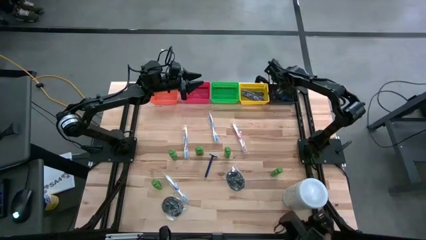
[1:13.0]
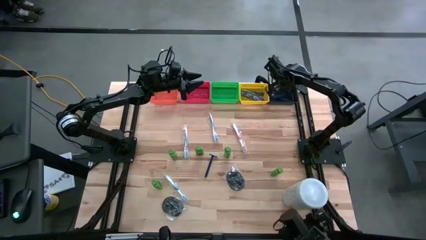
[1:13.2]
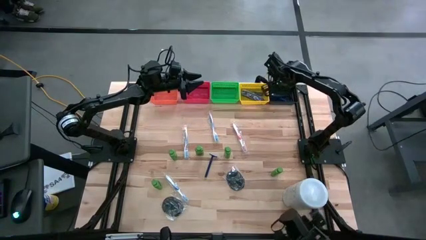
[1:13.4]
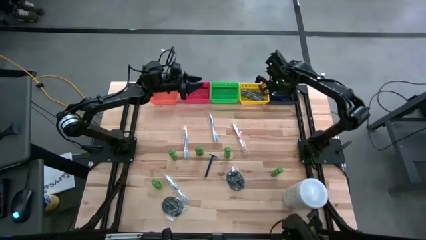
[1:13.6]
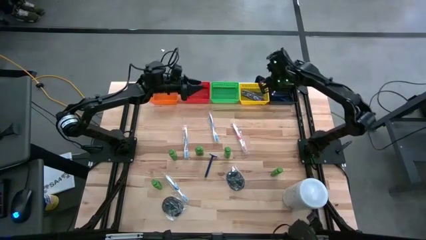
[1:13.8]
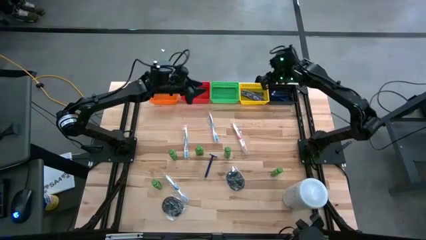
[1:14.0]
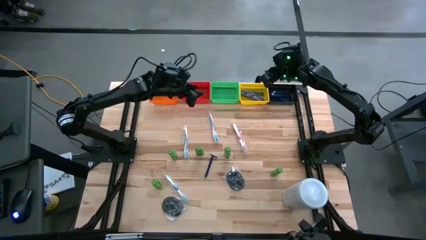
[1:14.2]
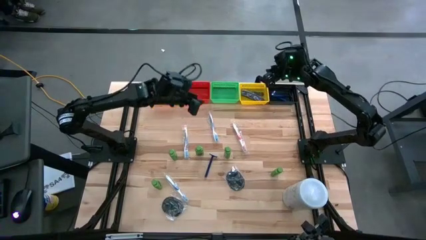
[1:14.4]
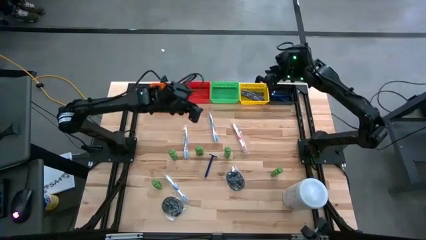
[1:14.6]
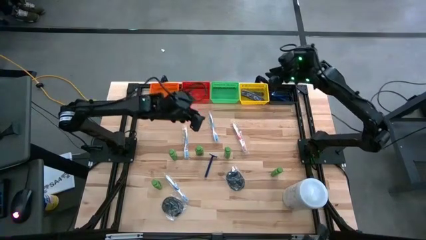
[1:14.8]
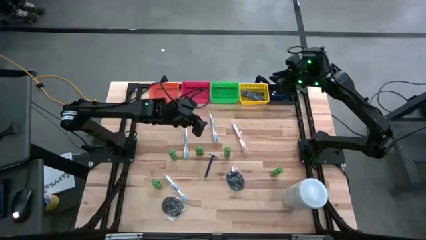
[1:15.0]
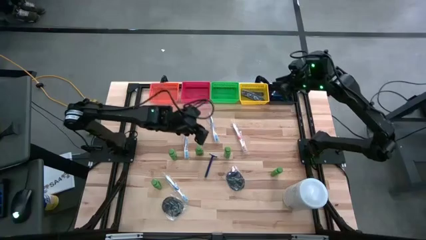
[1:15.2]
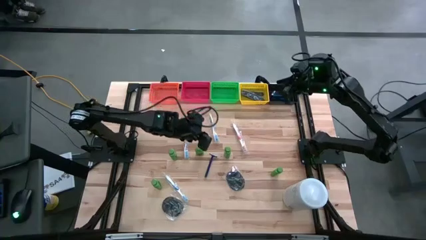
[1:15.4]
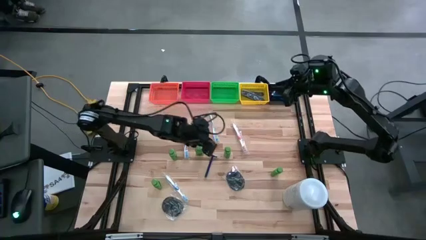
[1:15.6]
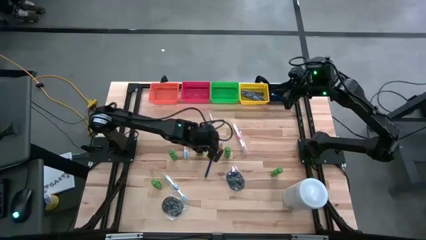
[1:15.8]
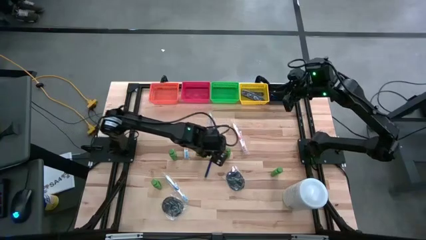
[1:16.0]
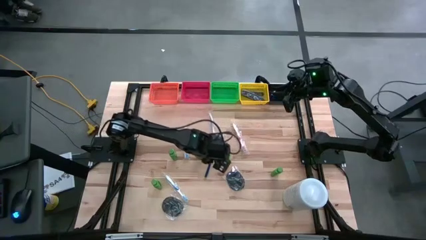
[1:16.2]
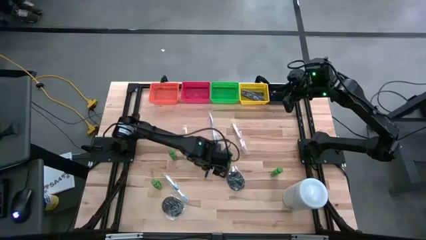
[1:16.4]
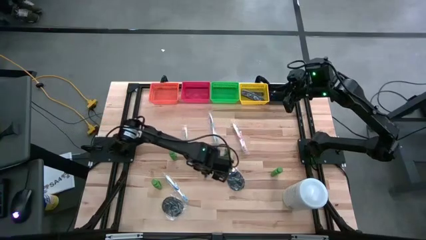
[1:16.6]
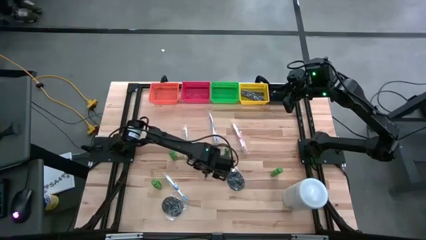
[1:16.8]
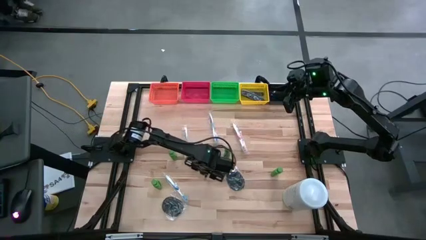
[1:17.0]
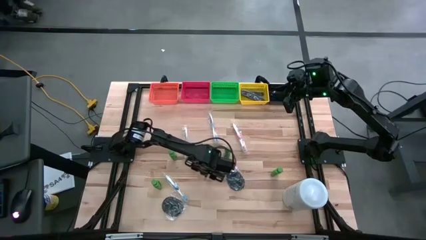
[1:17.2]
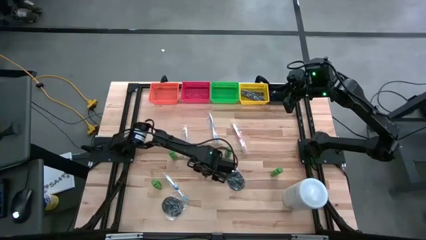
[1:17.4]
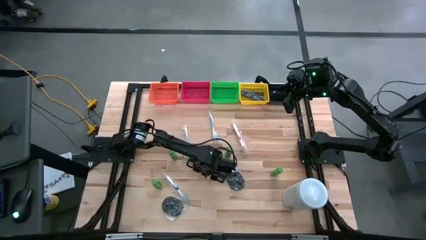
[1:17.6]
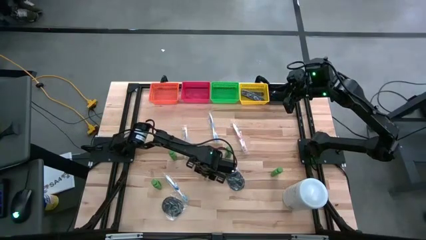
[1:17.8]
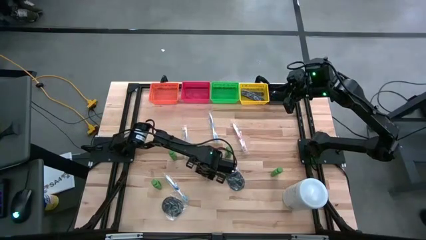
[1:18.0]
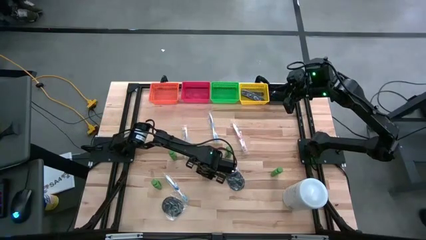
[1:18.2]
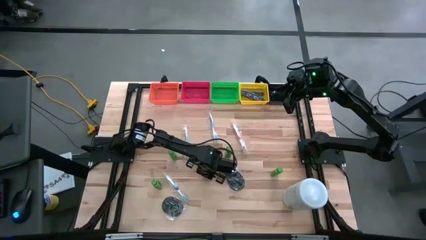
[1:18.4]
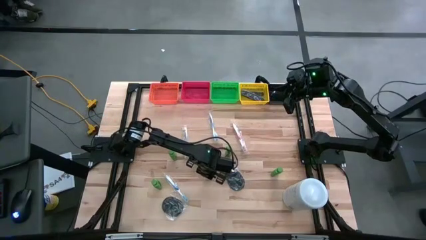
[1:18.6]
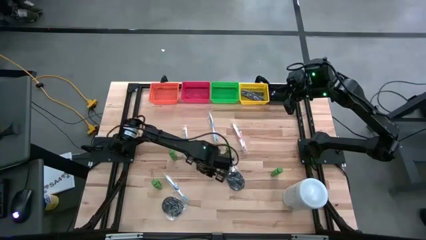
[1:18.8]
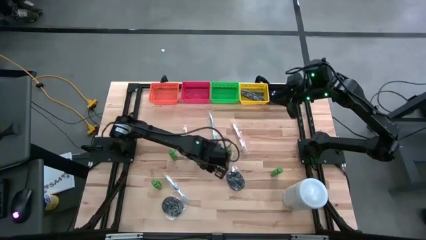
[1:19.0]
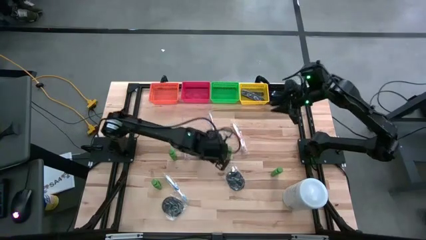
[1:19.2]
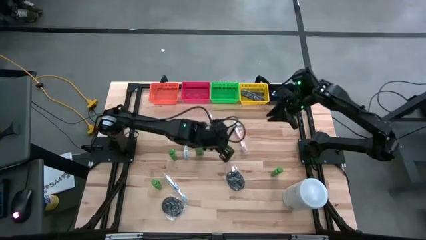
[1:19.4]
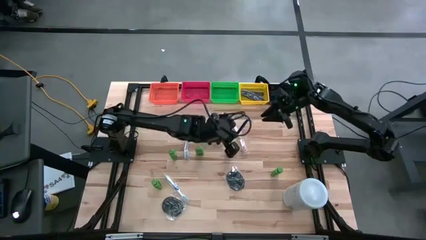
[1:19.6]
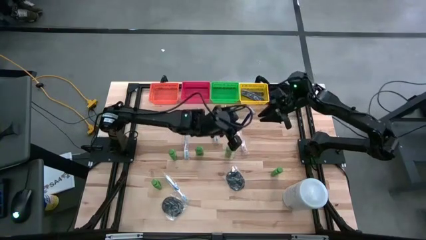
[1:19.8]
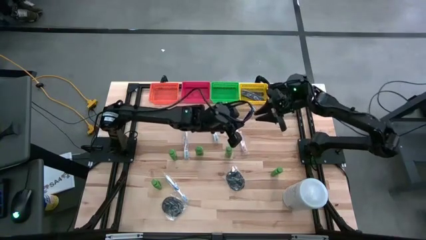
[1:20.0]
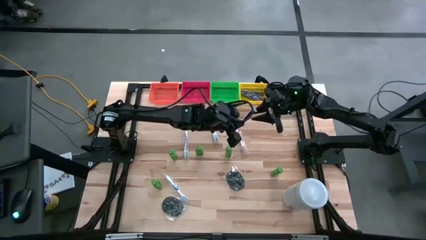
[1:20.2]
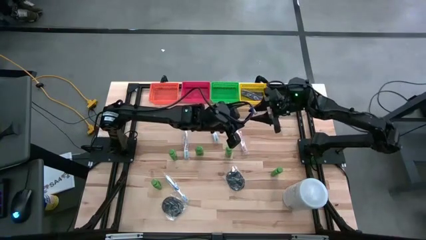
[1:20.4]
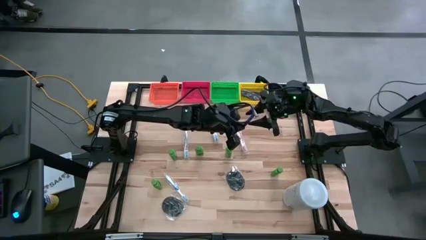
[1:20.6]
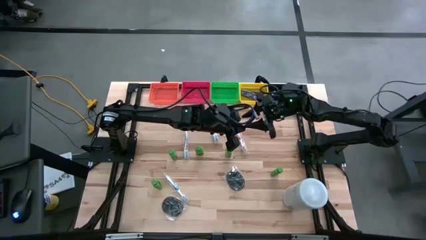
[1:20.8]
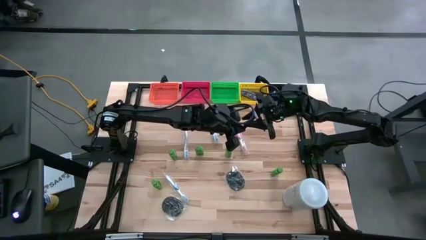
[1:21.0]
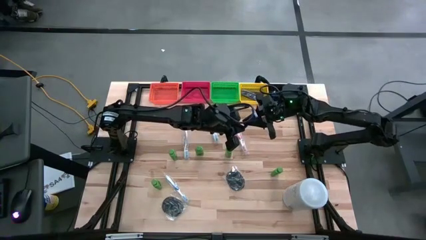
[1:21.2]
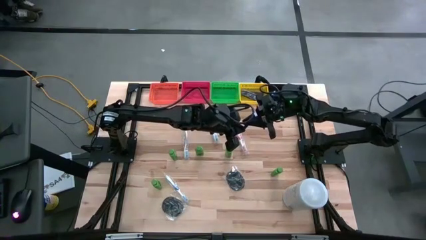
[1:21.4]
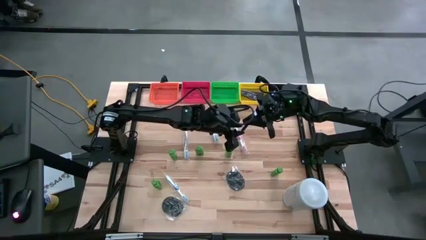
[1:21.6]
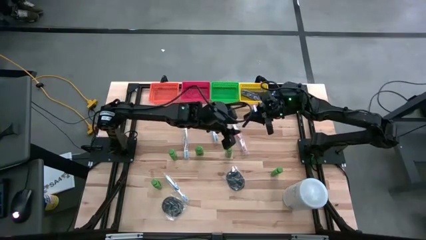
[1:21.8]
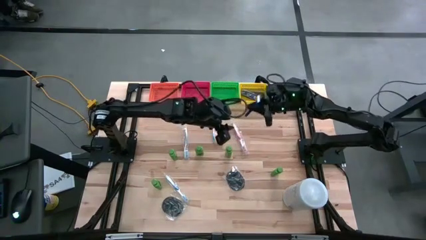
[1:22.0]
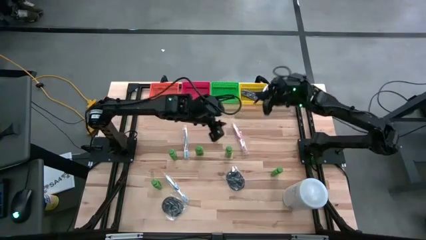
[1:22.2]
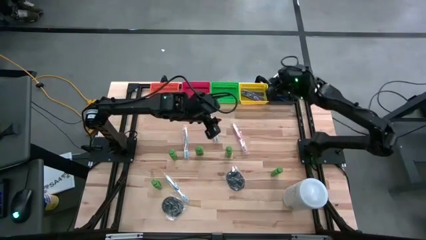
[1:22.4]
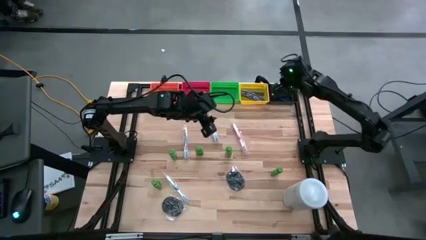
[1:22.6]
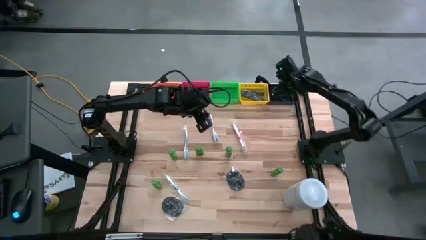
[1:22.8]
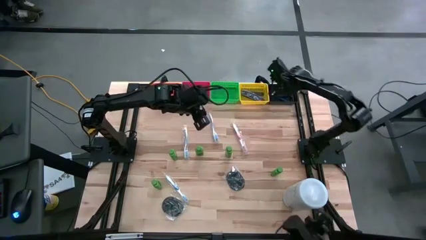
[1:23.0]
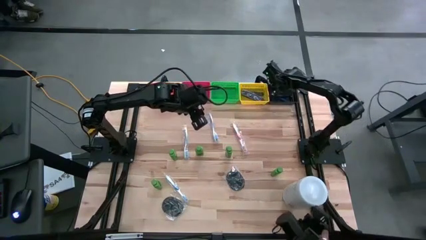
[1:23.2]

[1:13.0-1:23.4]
Task: Pick & Place Travel size toiletries
Put the blue razor into the black bin

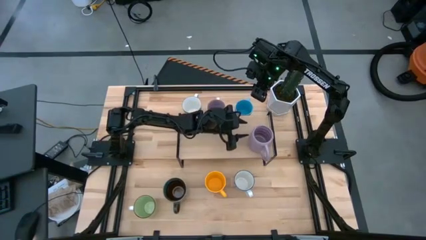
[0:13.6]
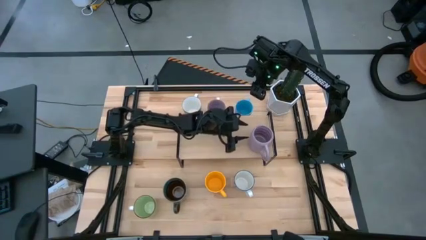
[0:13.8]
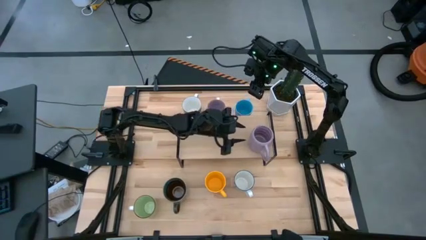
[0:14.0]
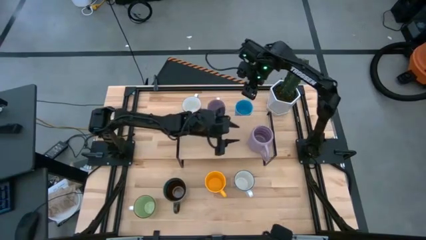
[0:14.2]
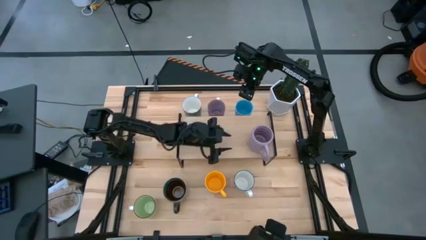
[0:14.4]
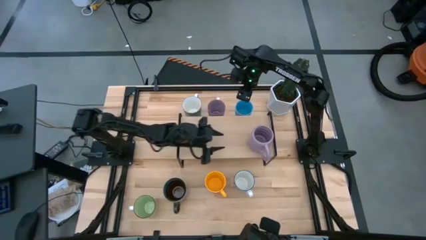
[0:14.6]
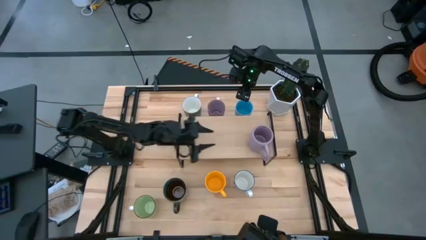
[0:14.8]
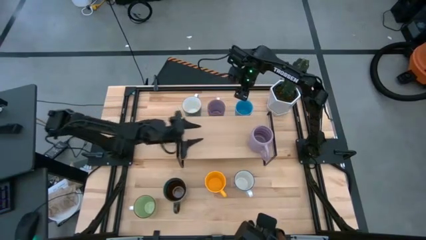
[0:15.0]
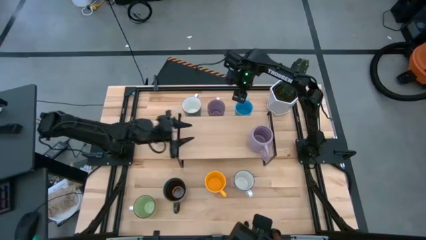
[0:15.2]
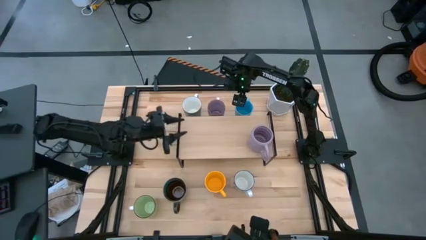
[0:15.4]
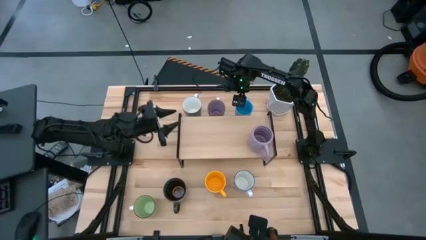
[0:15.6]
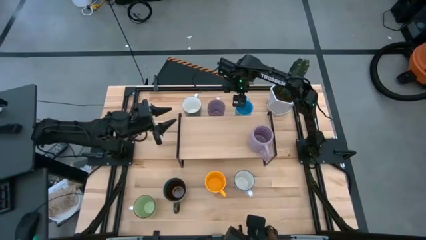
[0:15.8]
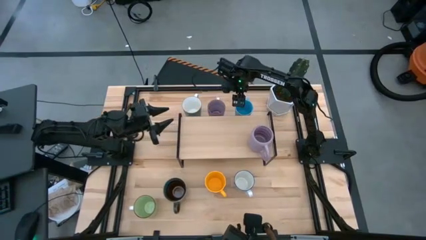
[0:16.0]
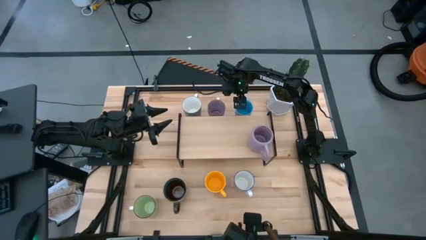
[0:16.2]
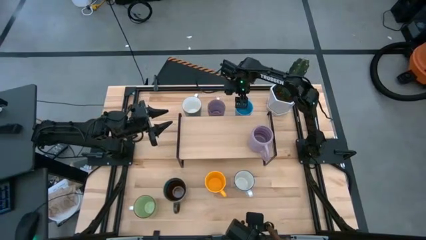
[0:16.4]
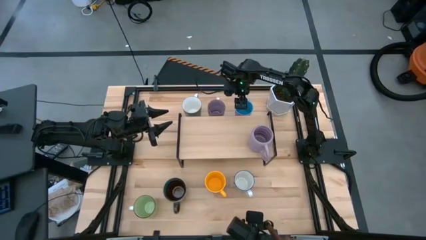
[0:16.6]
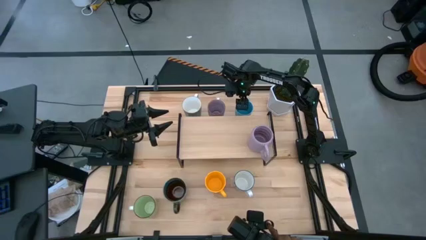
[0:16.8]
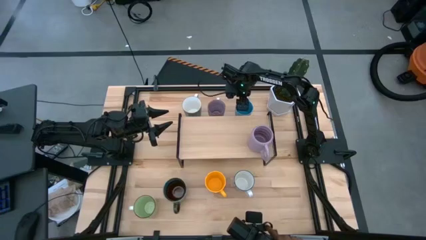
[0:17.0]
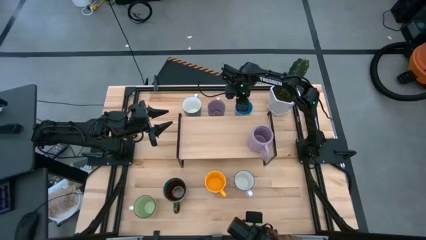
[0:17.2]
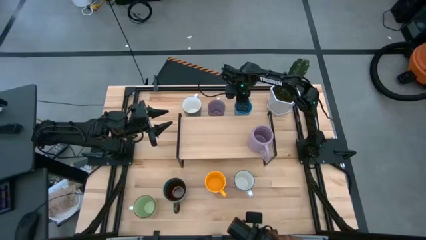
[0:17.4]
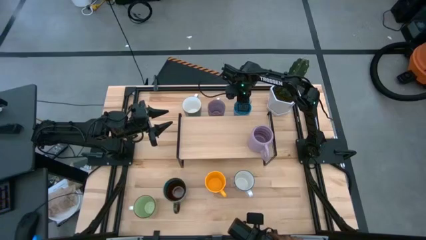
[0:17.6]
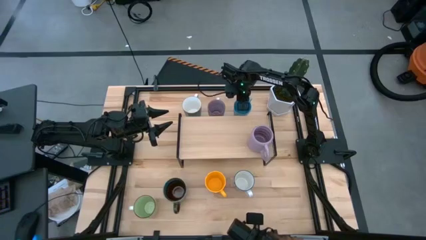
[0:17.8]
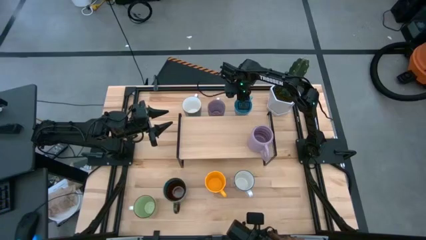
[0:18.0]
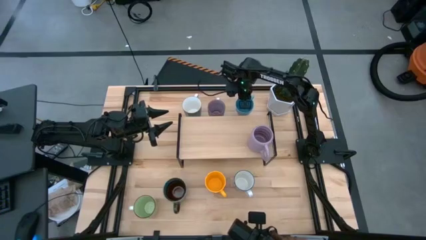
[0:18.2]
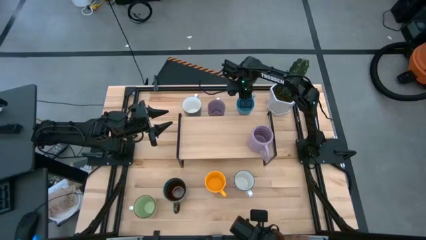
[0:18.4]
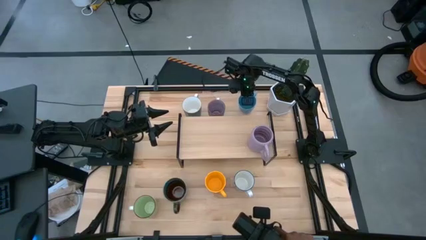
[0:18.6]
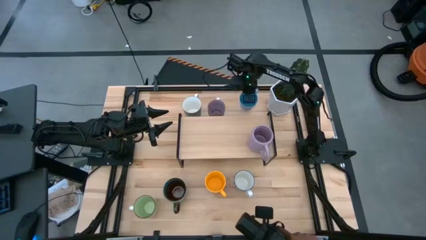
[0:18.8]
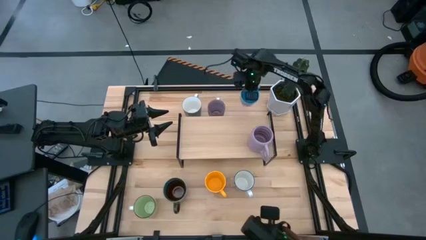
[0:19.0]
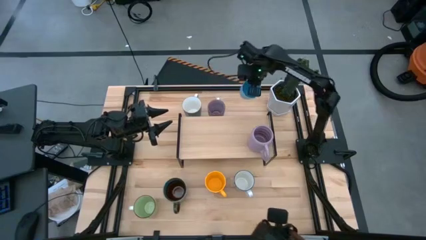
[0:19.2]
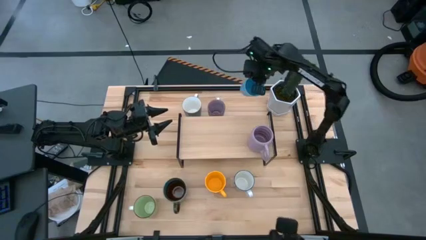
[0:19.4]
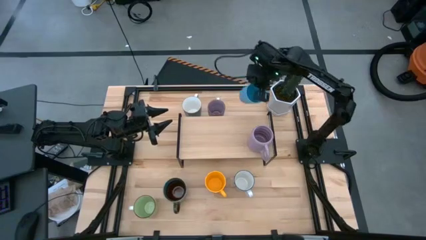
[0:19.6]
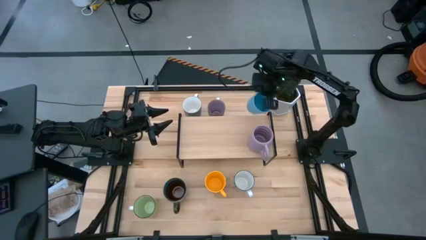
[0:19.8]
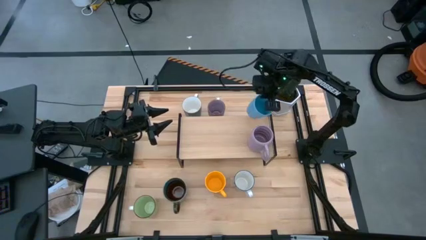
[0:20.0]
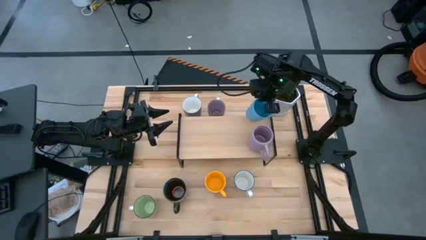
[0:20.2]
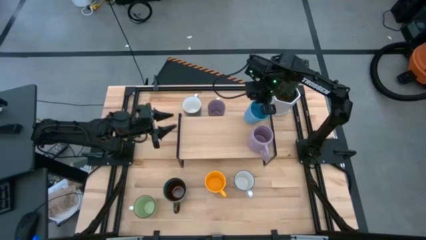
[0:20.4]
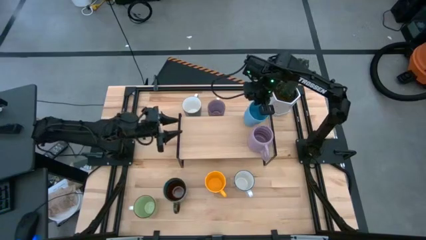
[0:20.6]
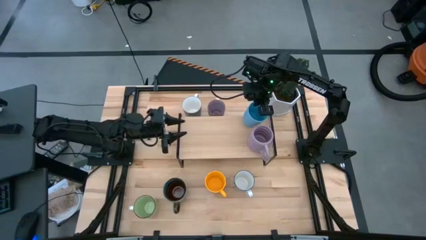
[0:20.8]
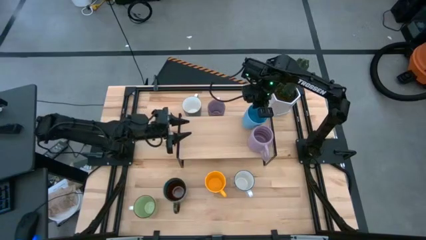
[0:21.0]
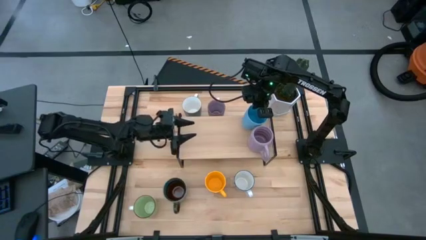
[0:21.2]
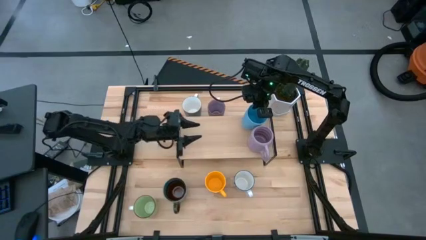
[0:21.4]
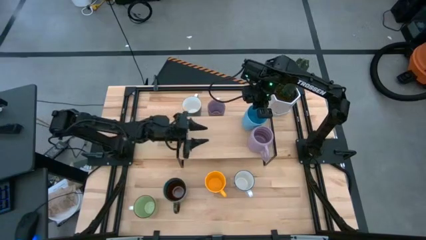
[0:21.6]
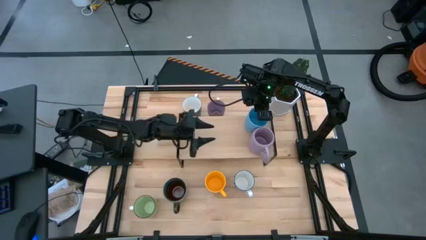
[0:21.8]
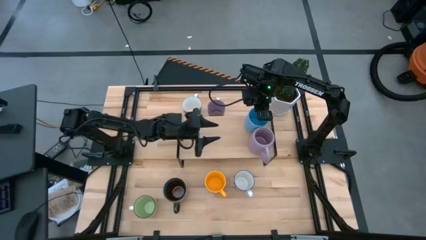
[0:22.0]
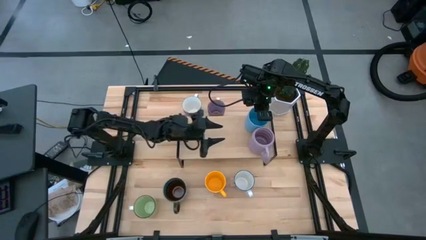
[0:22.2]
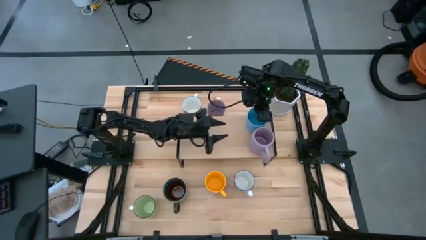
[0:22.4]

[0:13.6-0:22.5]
Task: Place coffee mugs
Put the light blue cup on the shelf aligned with the purple cup
